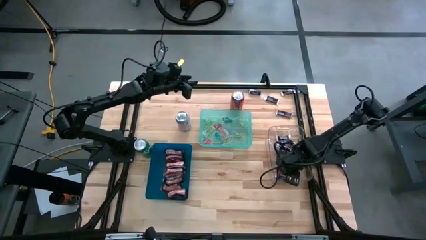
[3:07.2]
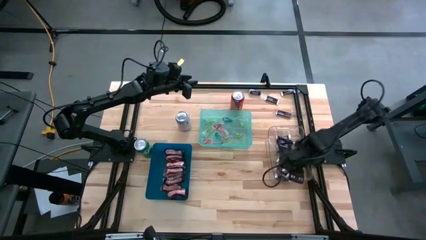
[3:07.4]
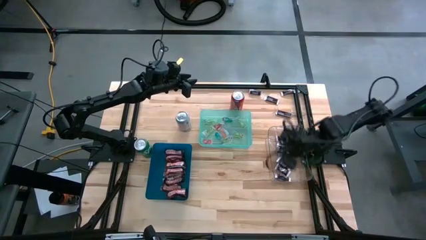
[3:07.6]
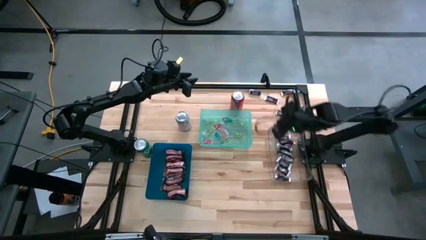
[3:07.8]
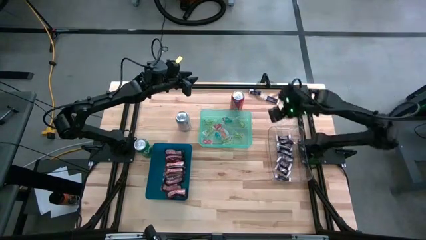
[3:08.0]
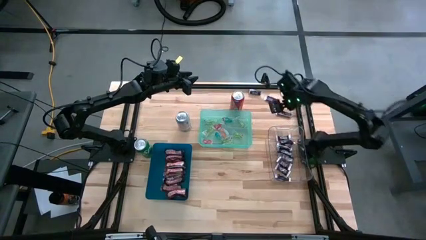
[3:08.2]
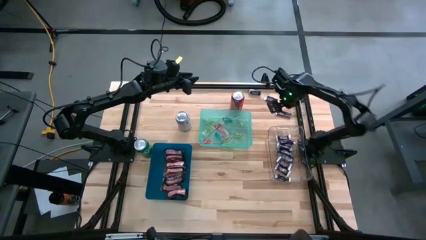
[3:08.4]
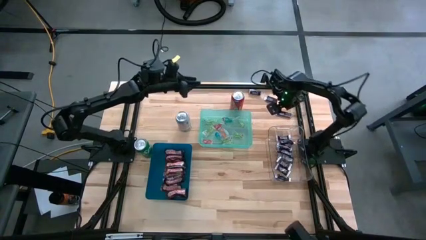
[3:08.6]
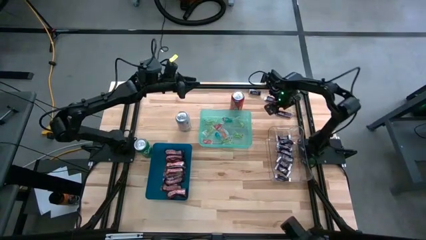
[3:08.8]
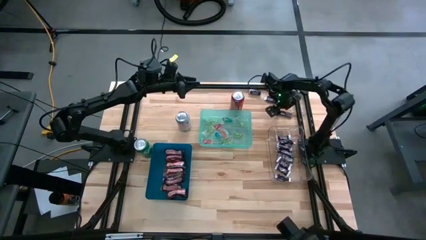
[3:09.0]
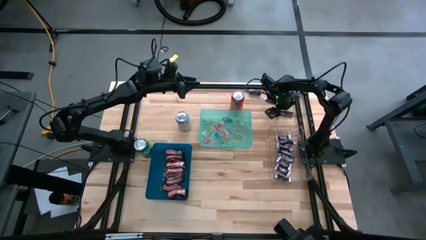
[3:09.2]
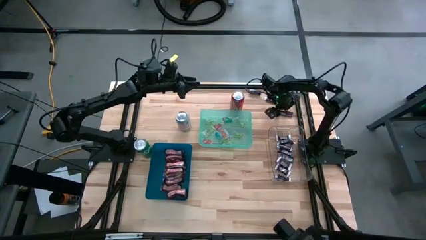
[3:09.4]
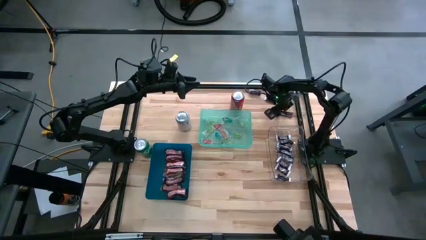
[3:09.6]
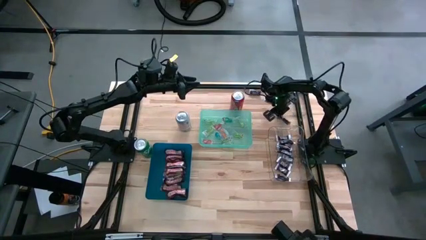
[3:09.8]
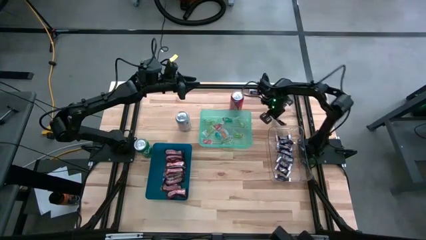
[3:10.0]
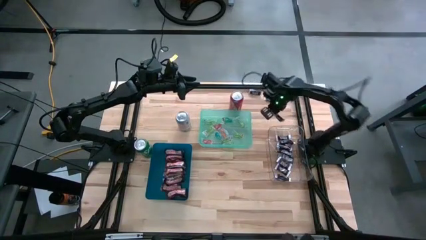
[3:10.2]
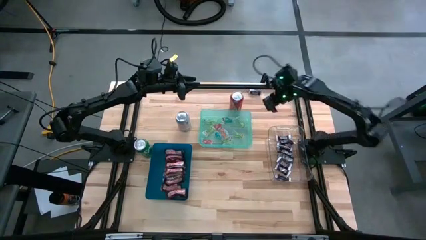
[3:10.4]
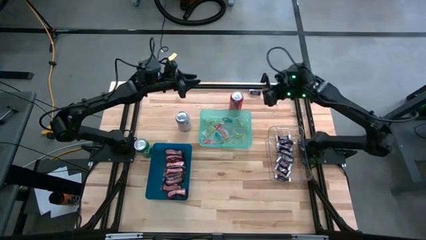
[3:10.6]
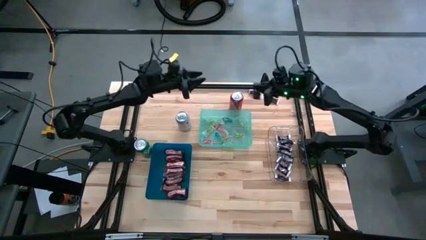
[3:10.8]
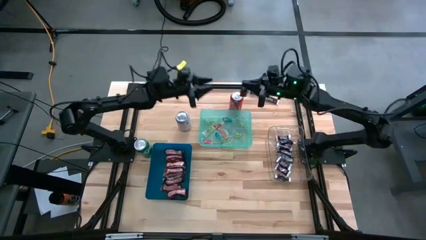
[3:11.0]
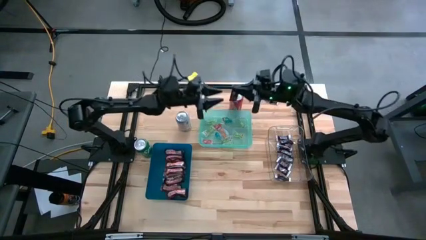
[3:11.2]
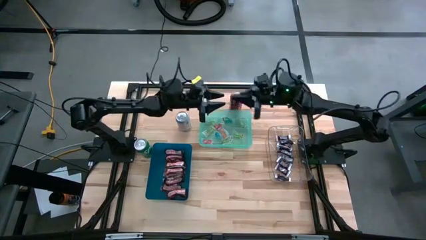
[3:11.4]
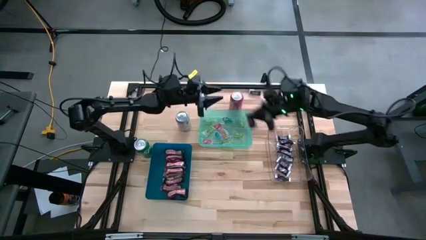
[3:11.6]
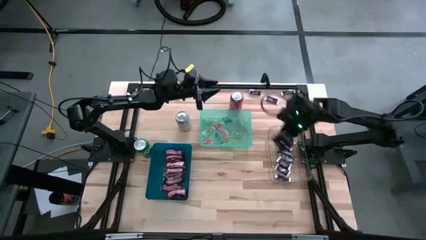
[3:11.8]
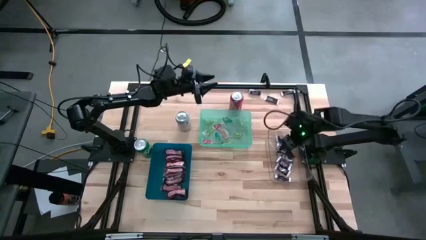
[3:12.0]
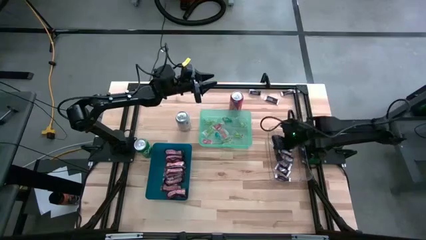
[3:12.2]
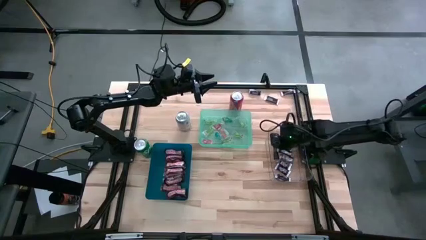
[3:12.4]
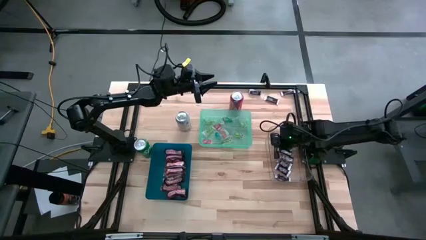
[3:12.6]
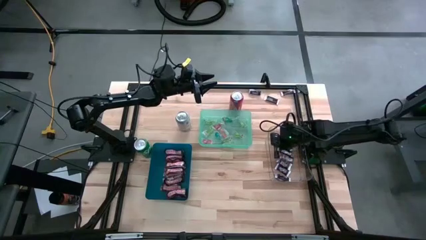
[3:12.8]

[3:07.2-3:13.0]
Task: Organize candy in baskets
Put the white brown chocolate into the transparent bin

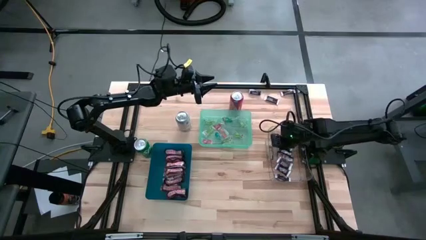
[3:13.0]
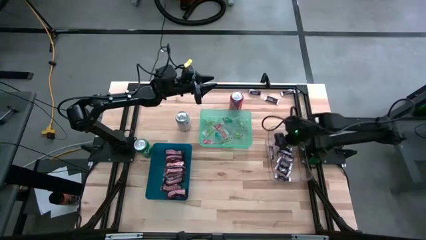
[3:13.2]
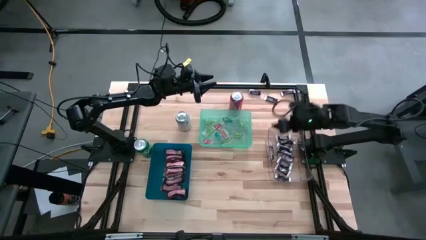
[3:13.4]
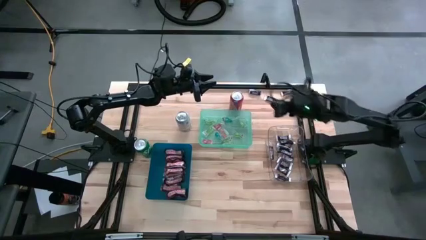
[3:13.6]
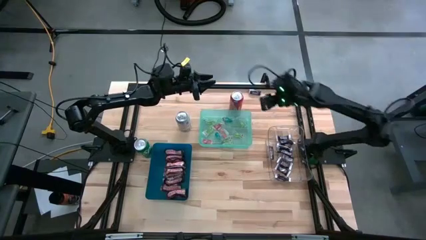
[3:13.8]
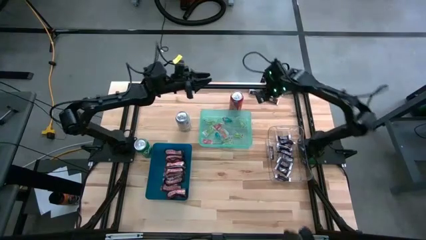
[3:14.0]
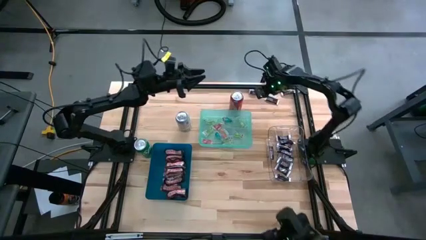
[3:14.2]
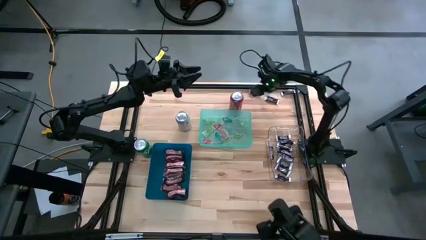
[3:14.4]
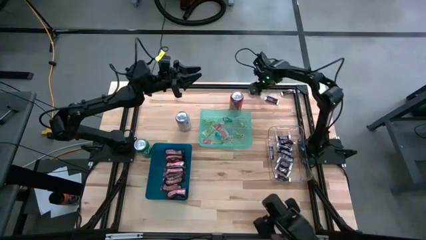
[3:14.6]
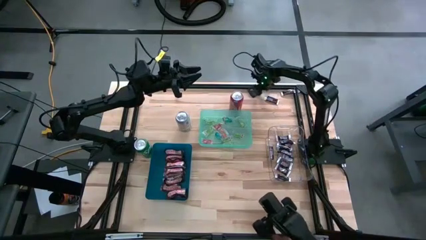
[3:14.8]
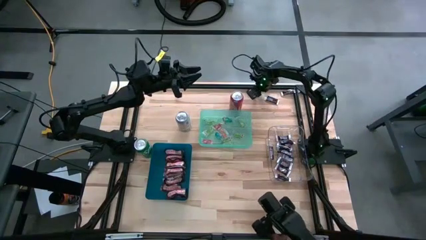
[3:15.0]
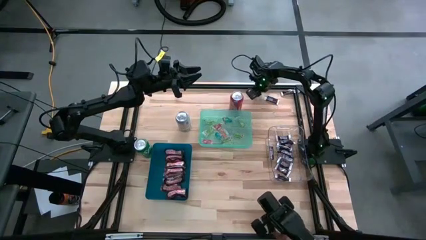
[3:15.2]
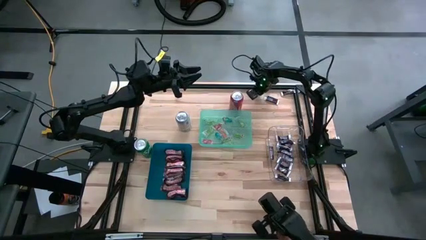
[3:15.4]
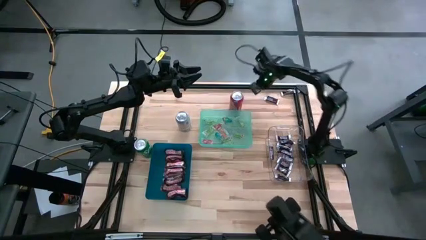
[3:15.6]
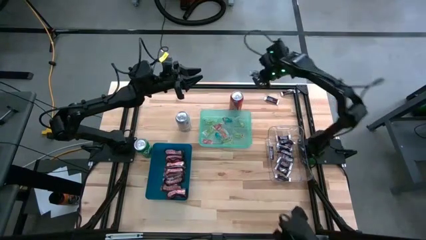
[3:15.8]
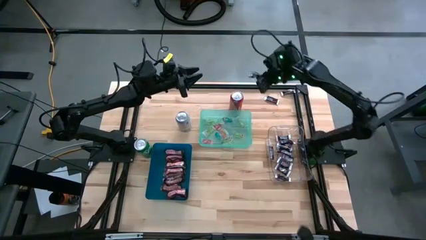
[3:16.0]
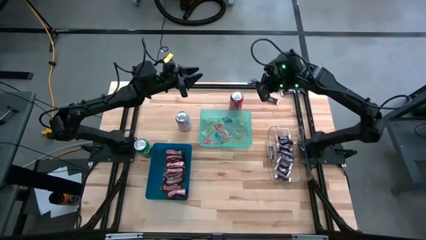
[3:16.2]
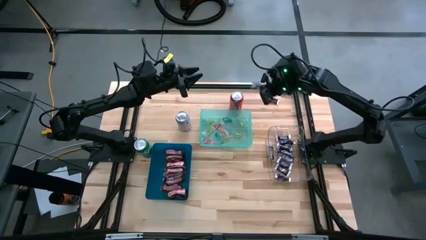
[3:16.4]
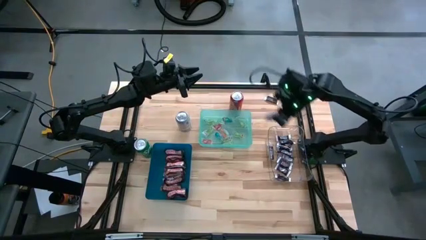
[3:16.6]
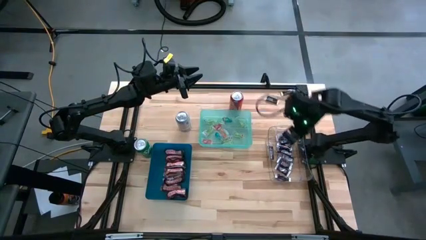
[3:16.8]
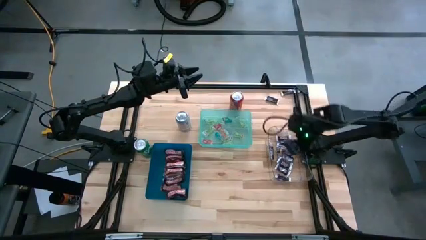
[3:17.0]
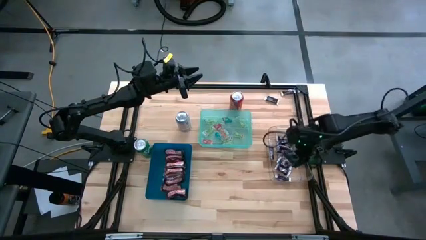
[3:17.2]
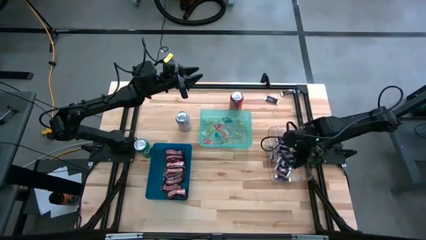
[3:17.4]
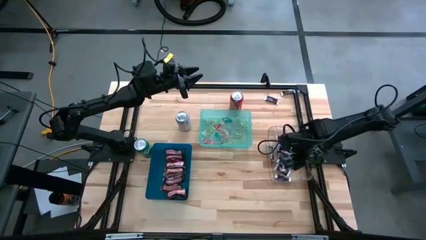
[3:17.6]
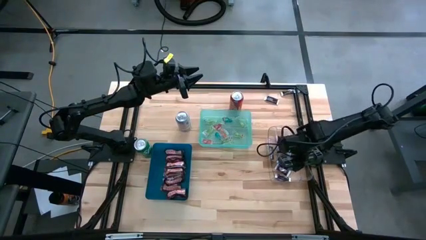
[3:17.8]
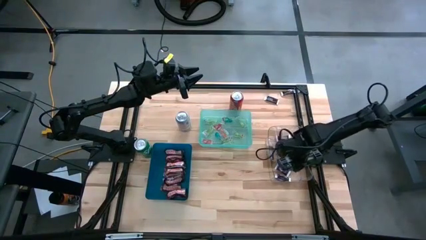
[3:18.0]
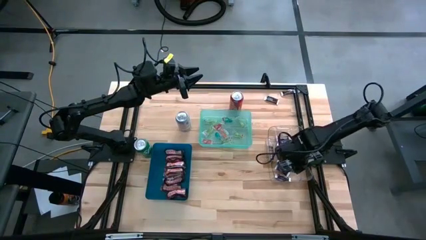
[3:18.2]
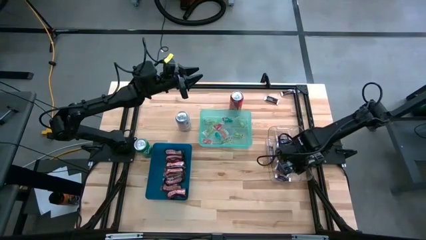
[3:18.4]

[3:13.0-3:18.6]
Put the white brown chocolate into the transparent bin

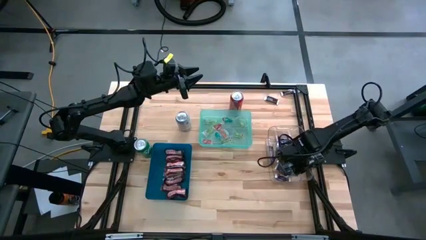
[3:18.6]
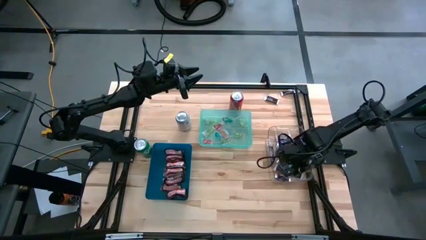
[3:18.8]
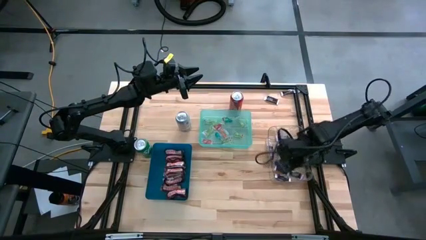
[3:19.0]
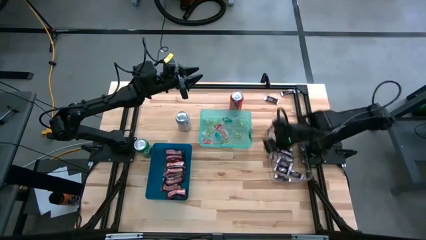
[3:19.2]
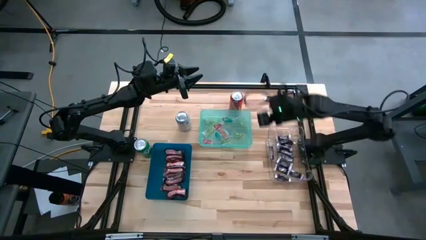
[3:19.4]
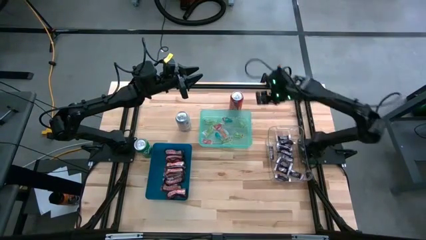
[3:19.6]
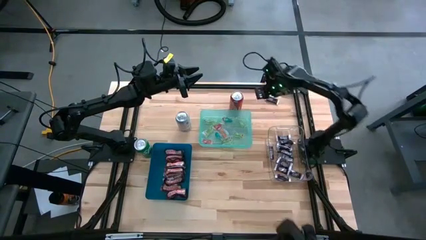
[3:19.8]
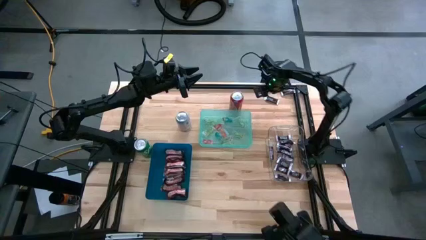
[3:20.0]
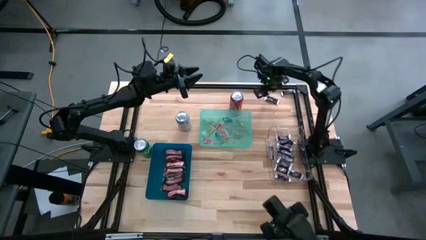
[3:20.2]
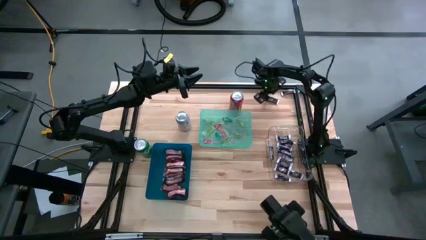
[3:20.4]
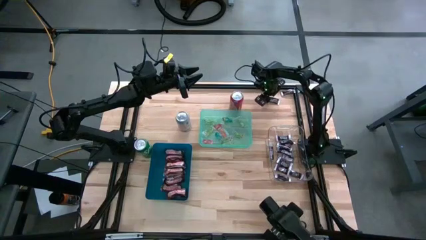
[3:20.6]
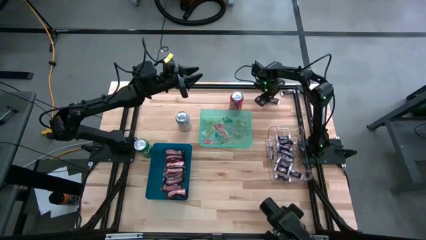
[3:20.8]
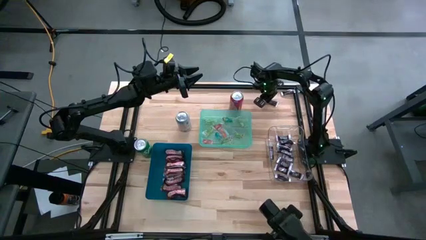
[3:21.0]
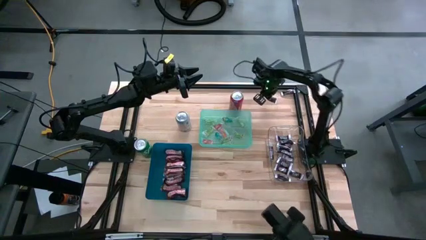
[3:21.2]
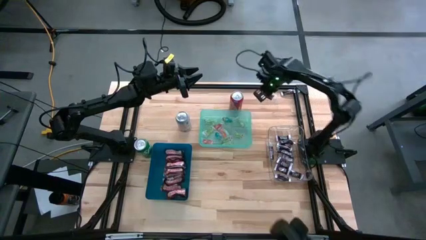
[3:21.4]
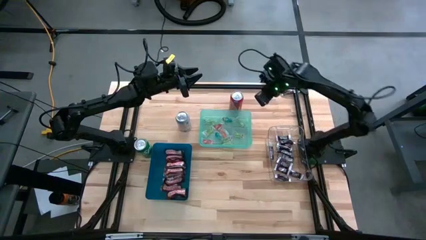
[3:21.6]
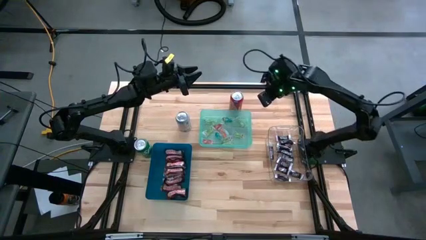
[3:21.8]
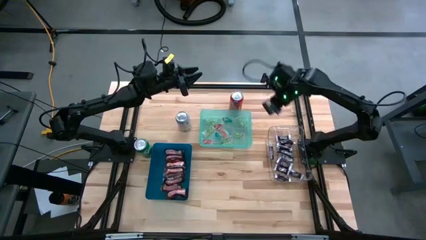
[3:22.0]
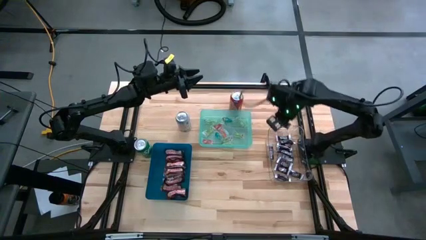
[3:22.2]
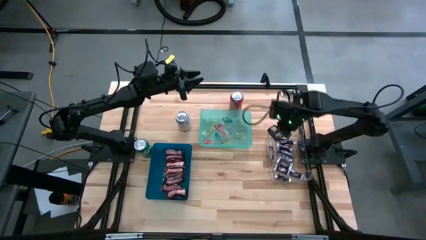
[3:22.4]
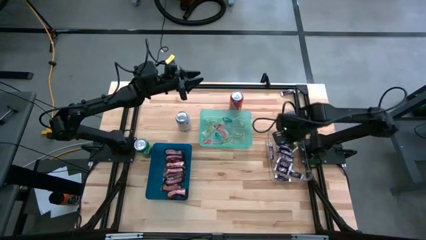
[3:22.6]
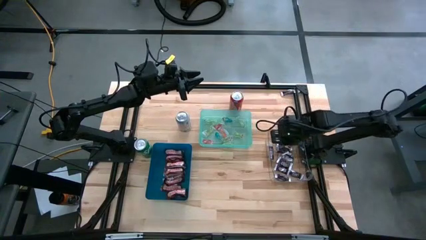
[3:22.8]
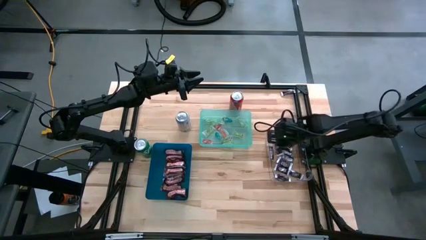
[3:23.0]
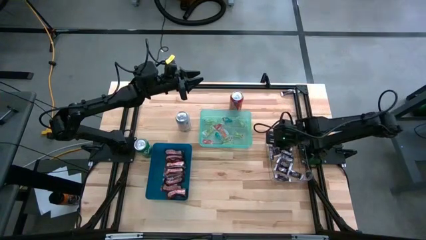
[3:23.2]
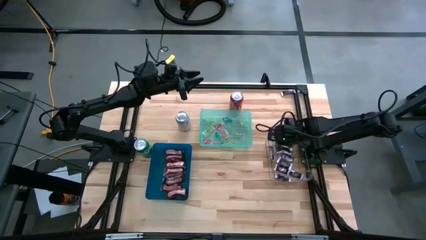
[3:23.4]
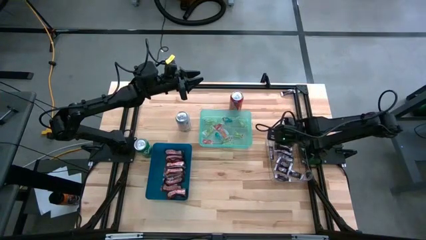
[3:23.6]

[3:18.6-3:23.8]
Put the white brown chocolate into the transparent bin
